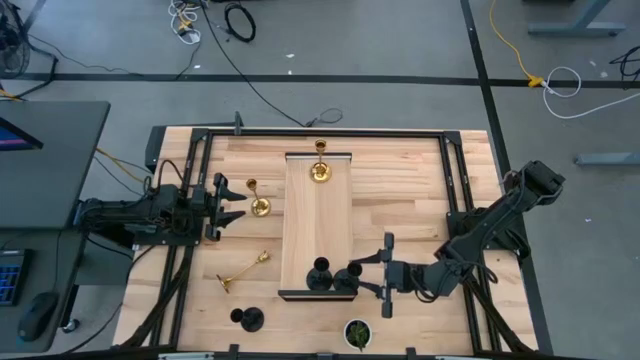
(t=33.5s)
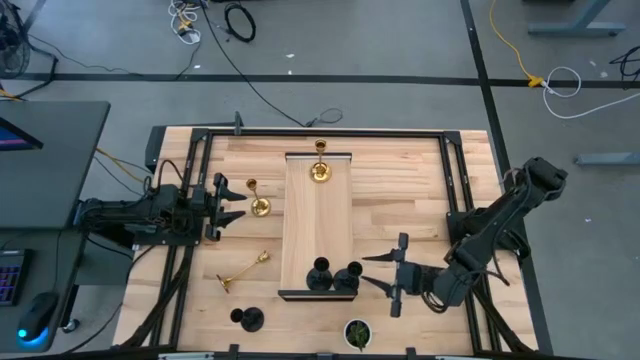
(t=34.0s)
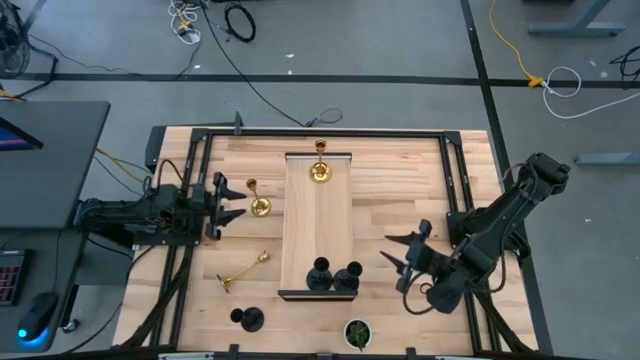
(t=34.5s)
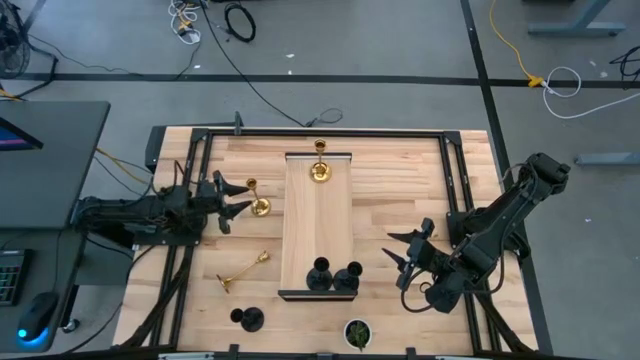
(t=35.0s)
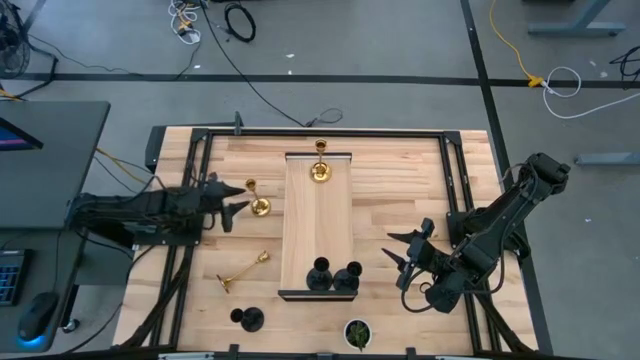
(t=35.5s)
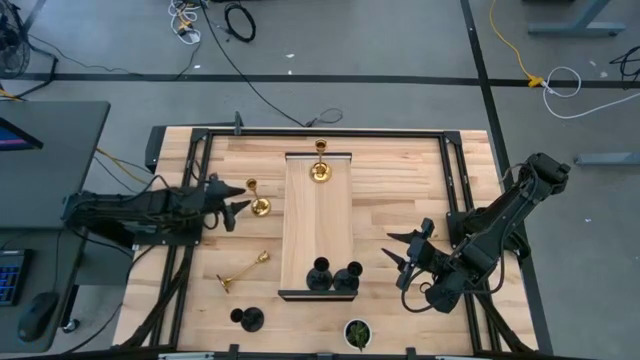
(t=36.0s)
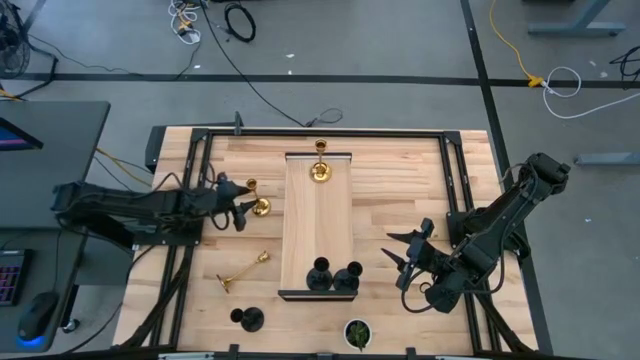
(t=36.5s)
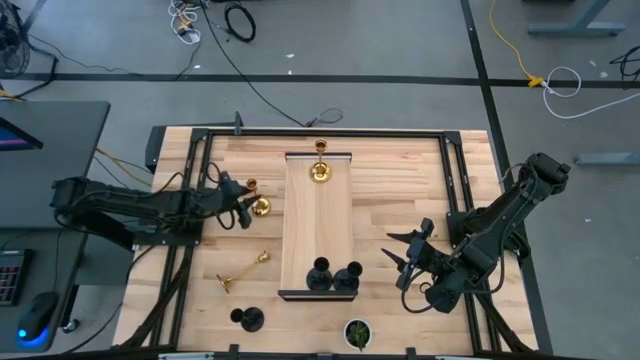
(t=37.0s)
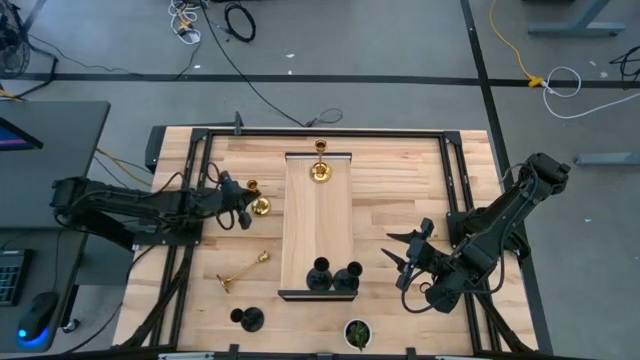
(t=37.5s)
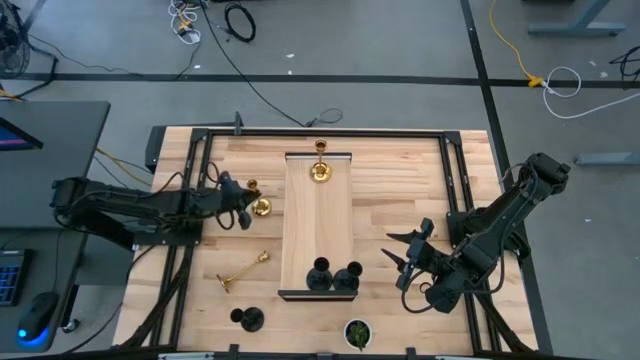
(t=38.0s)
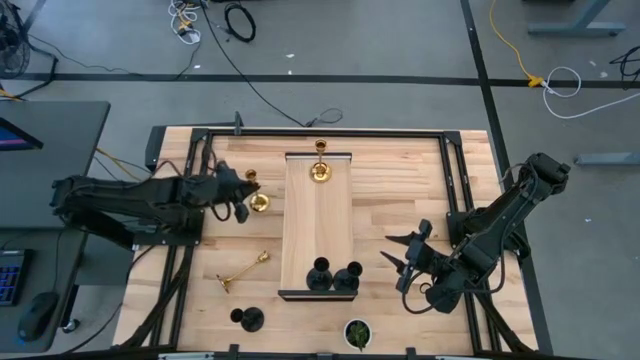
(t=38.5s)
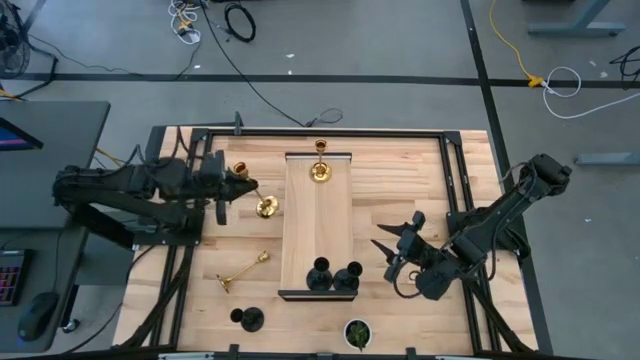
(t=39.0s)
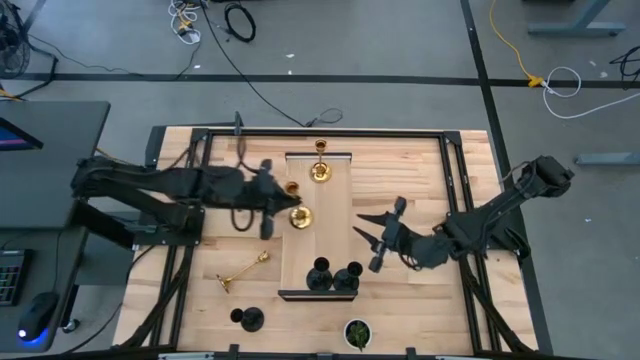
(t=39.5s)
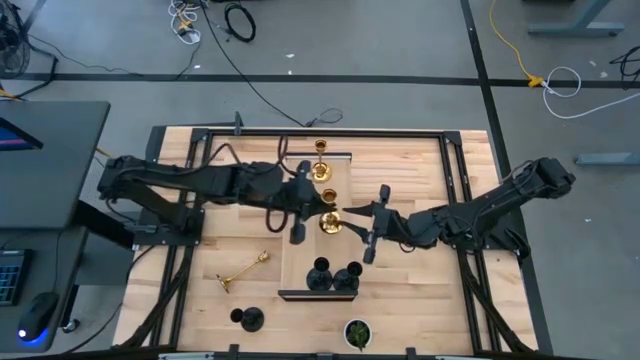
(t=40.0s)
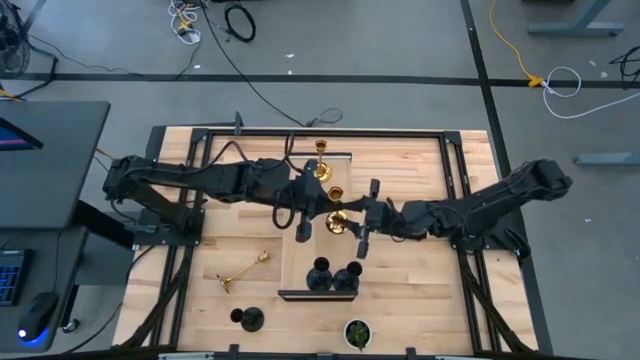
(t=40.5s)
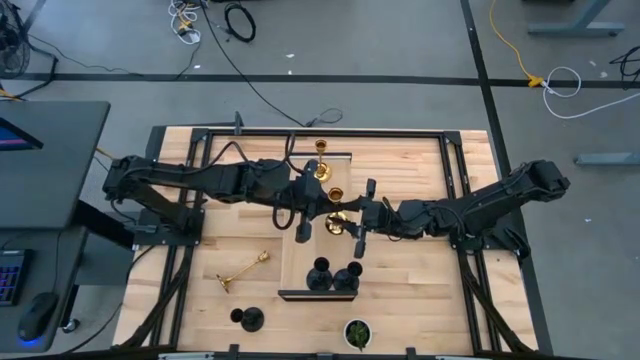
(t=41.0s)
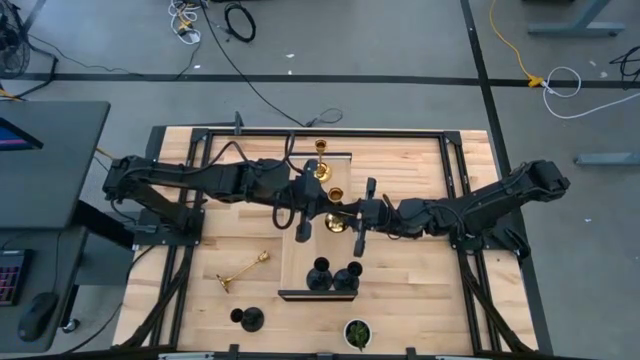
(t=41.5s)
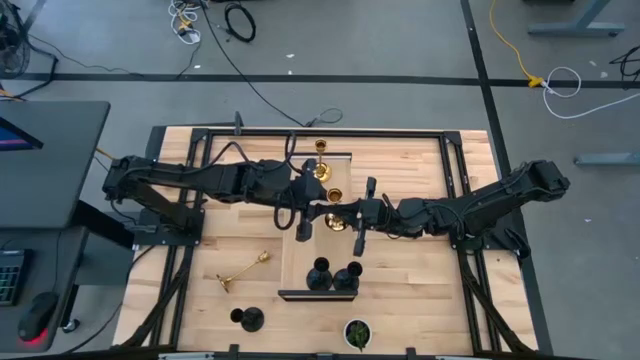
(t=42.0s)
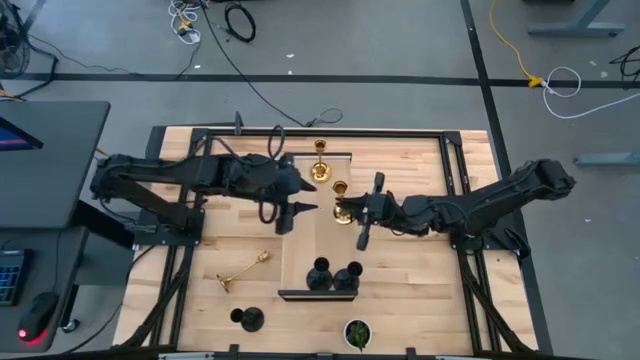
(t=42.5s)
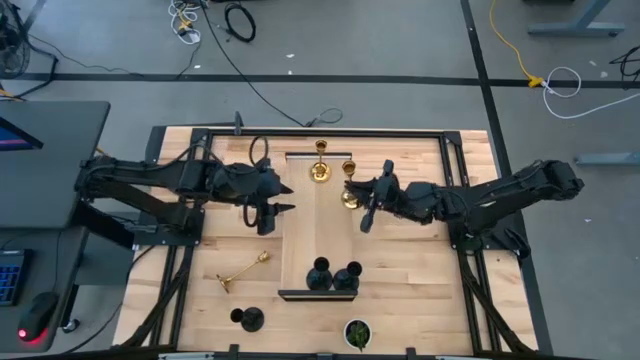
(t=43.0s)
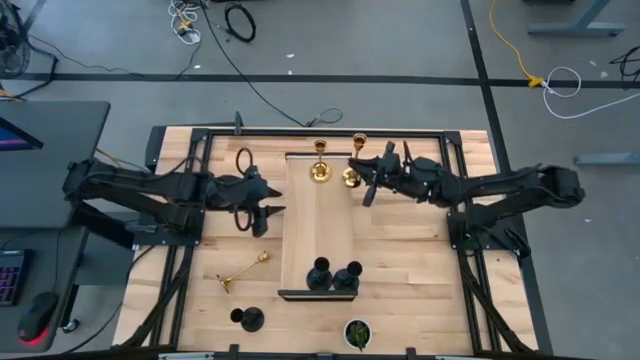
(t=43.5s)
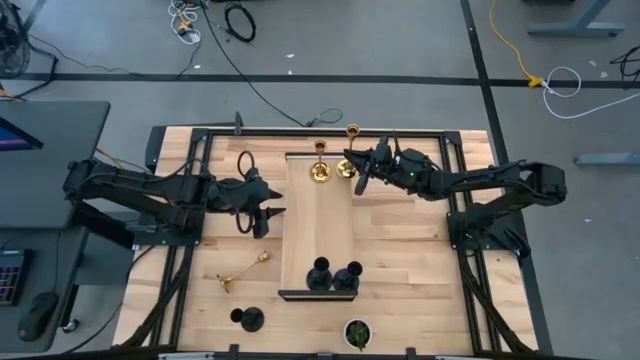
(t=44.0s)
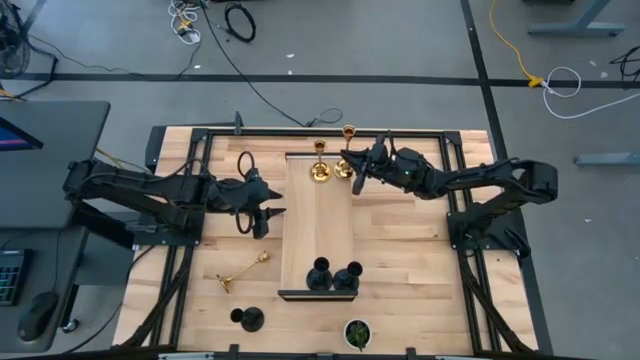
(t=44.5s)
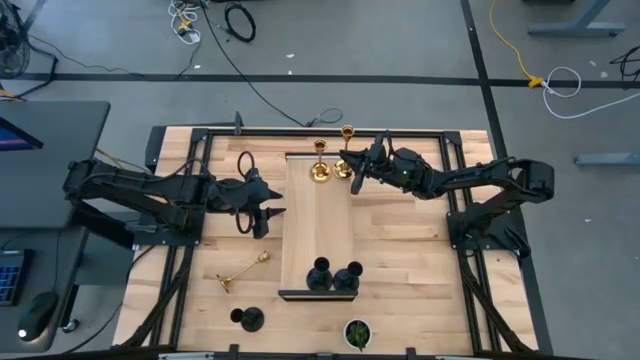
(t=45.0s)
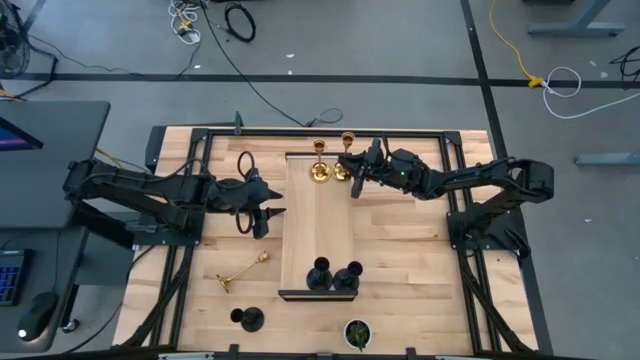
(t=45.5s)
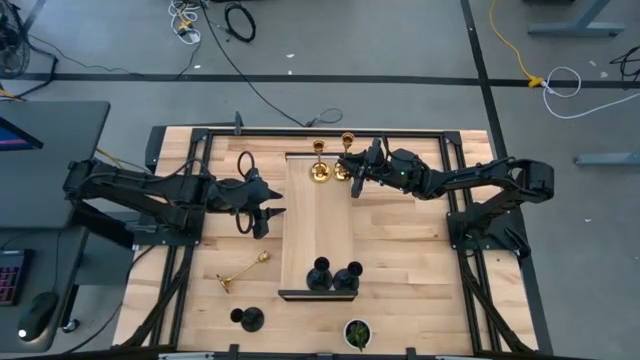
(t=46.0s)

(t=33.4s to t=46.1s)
Task: Pick & Place candle stick holders
Put the top gold candle holder on the shelf aligned with the gold candle holder

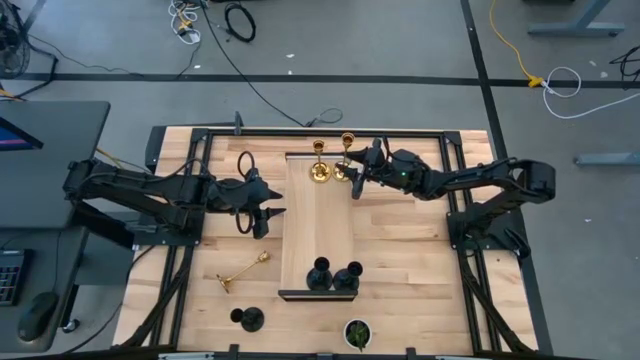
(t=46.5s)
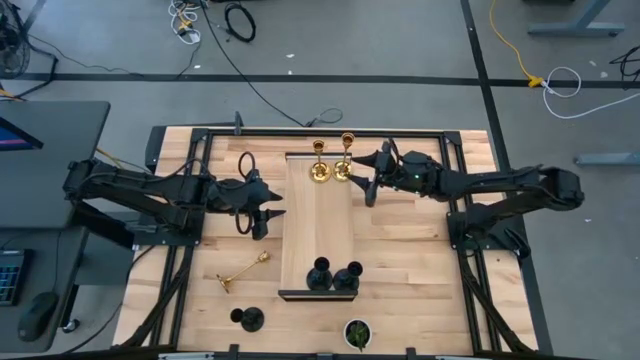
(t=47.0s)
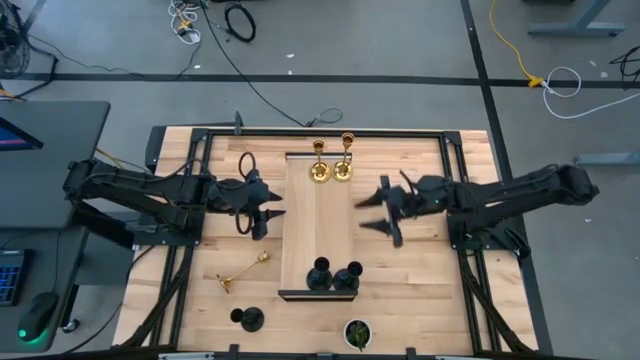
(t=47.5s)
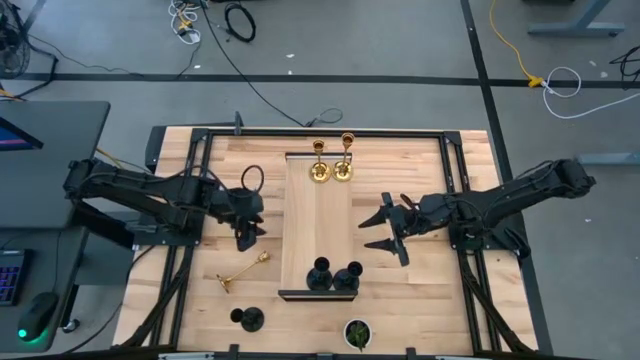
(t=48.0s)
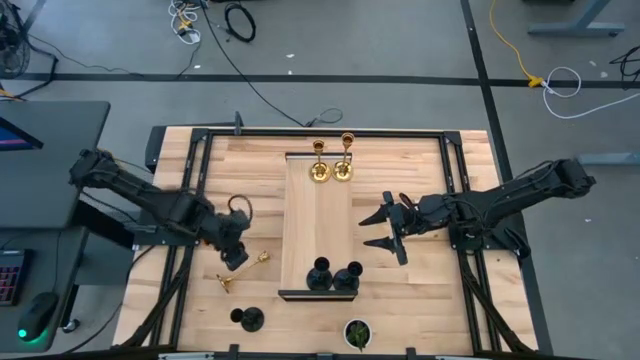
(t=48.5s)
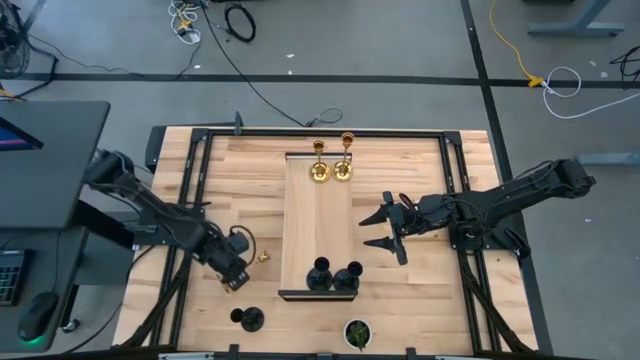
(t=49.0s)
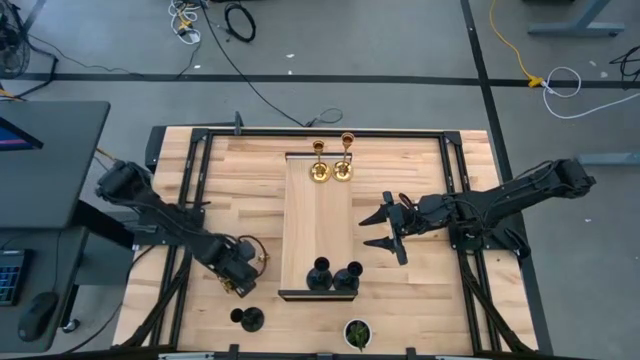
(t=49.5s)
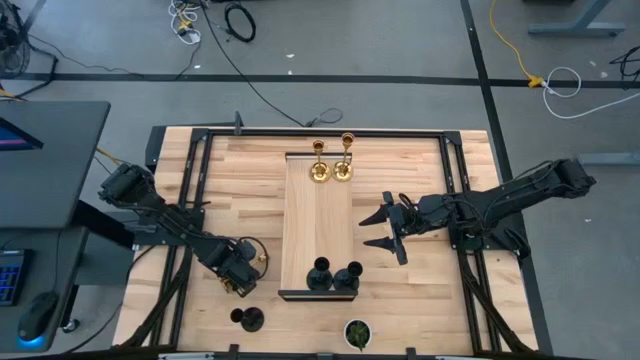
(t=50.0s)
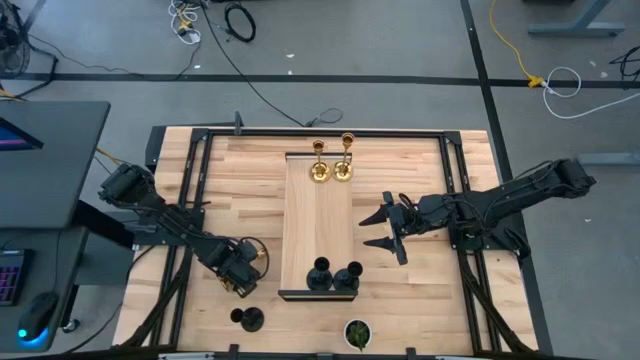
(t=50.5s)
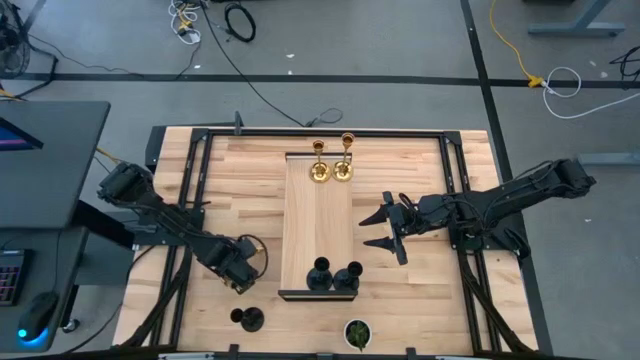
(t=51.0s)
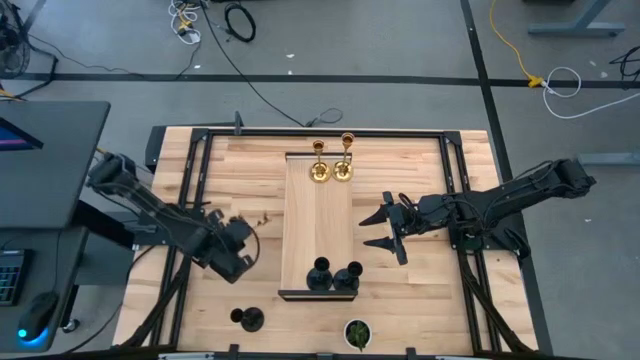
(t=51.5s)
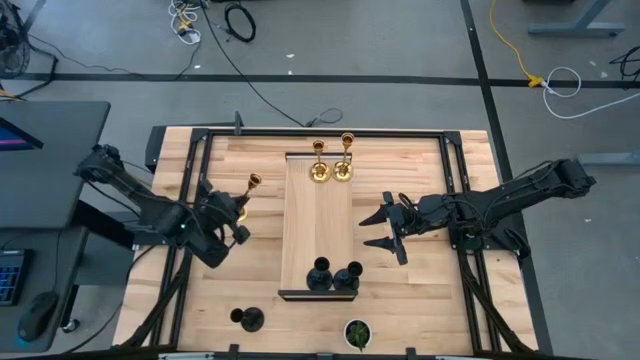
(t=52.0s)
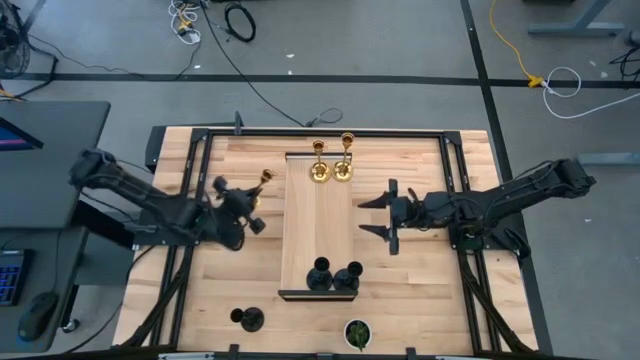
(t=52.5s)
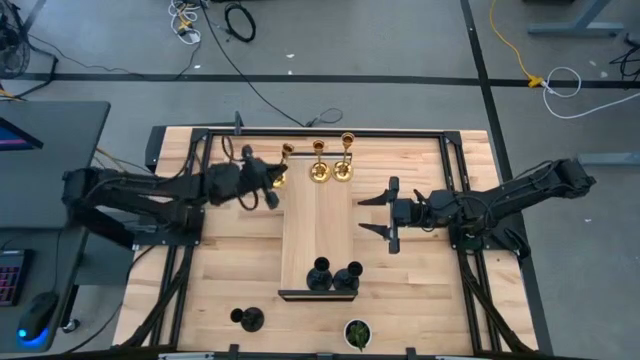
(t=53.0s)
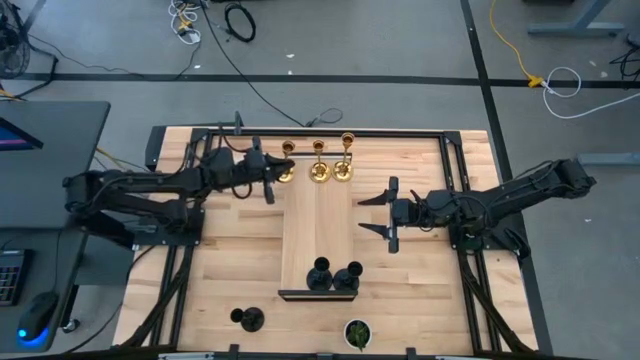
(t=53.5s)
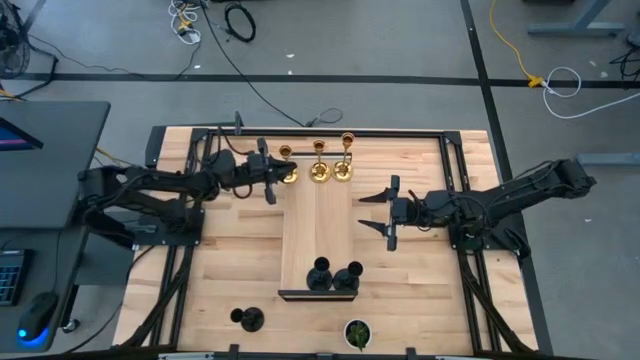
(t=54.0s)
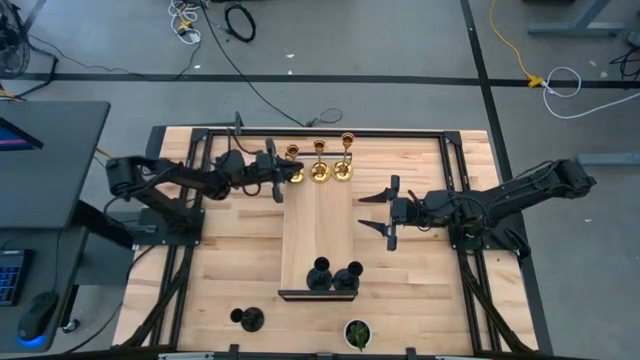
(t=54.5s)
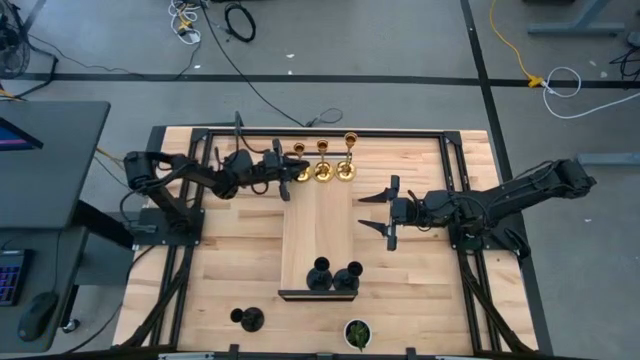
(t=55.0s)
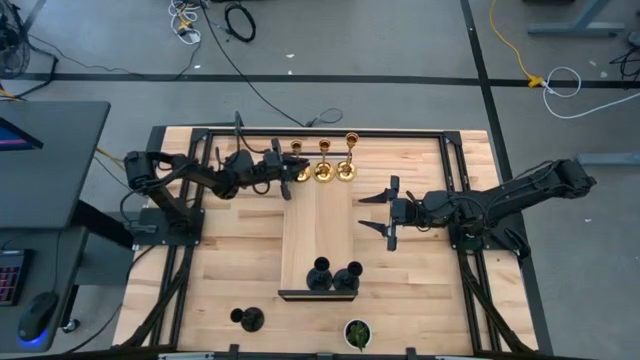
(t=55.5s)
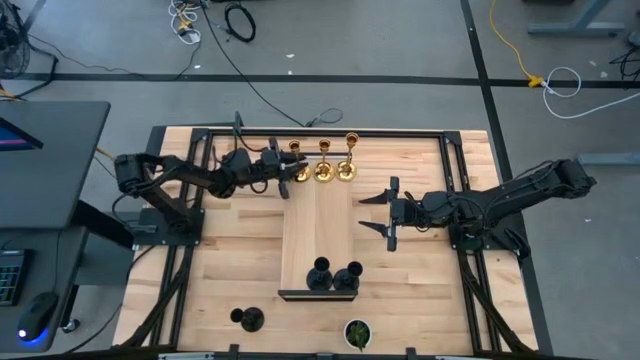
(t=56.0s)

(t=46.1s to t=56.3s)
Put the gold candle holder on the shelf aligned with the gold candle holder
